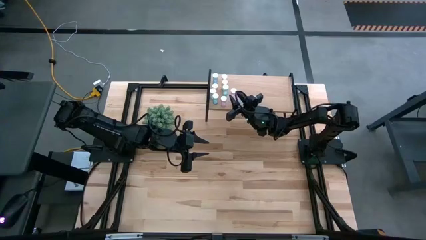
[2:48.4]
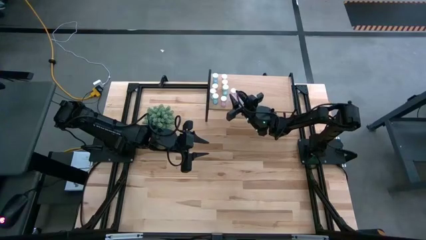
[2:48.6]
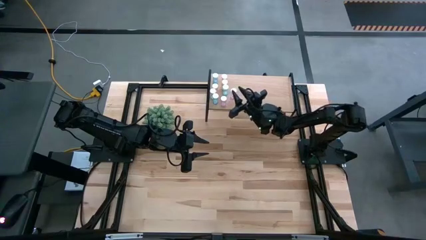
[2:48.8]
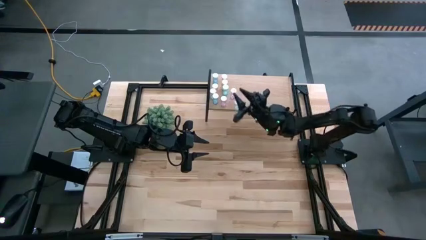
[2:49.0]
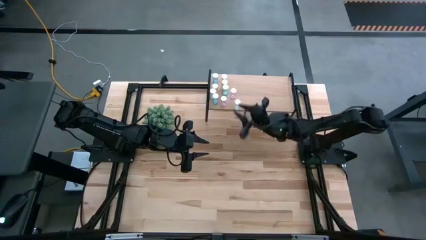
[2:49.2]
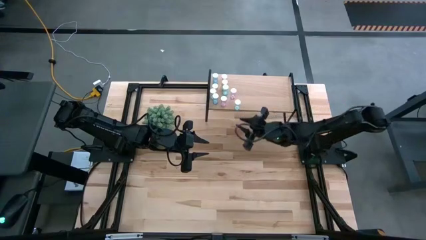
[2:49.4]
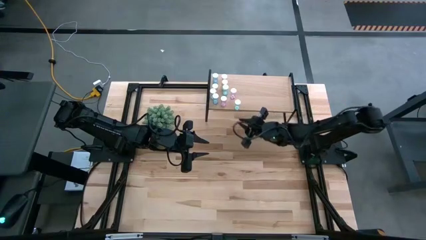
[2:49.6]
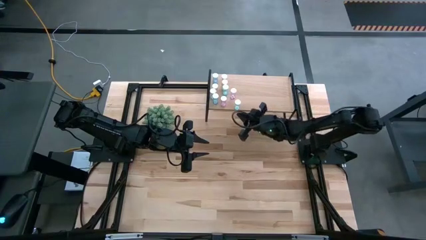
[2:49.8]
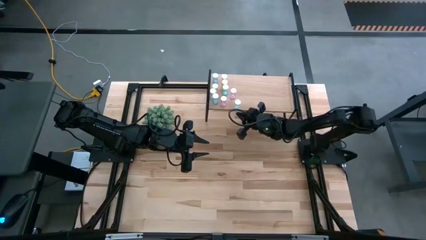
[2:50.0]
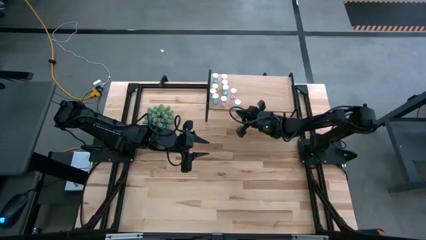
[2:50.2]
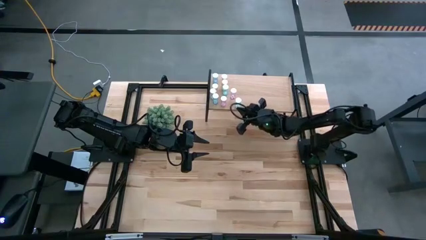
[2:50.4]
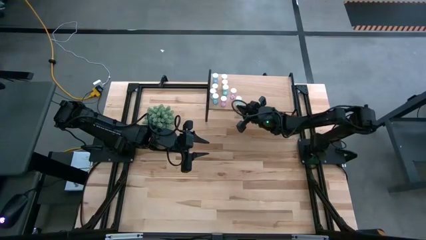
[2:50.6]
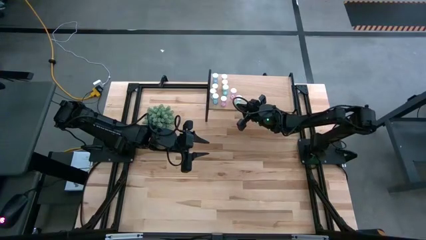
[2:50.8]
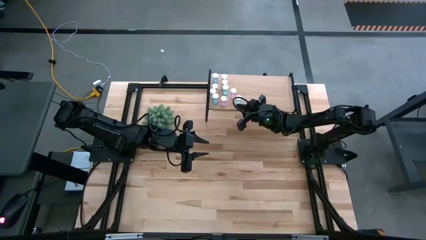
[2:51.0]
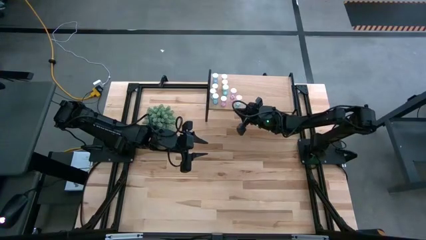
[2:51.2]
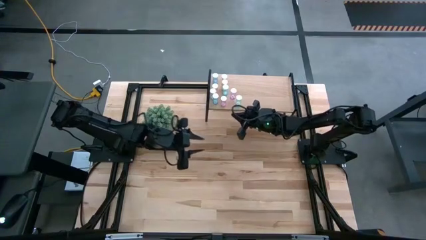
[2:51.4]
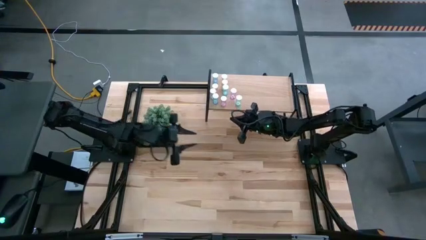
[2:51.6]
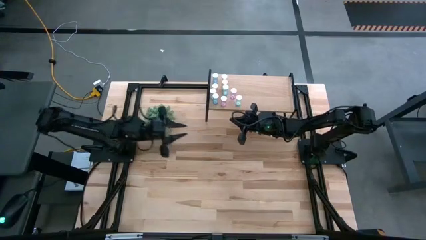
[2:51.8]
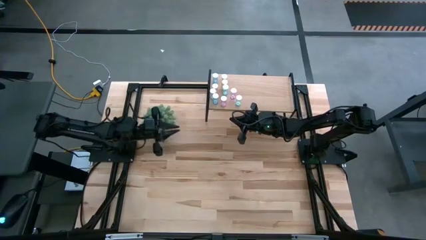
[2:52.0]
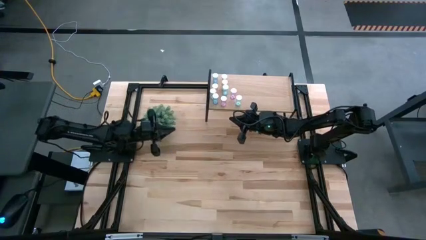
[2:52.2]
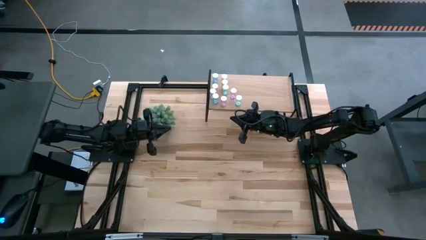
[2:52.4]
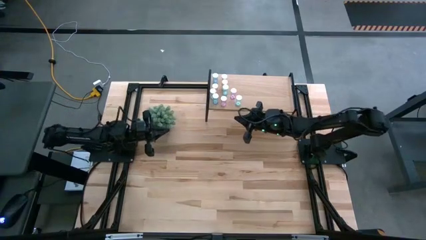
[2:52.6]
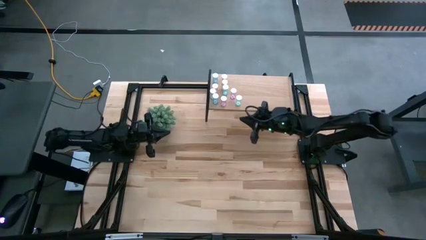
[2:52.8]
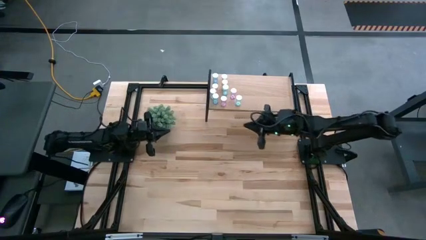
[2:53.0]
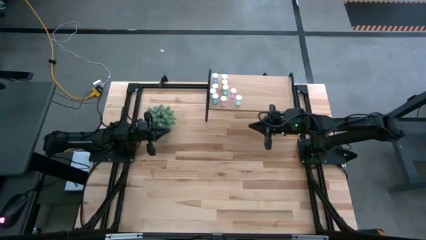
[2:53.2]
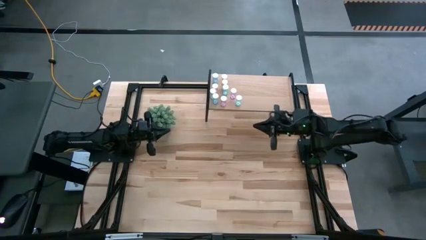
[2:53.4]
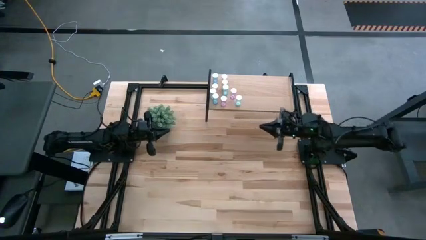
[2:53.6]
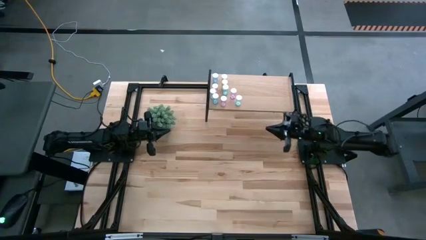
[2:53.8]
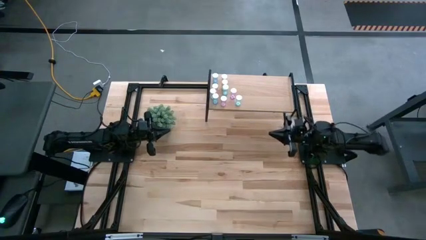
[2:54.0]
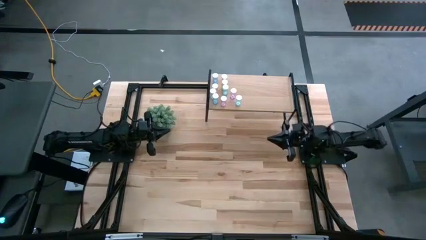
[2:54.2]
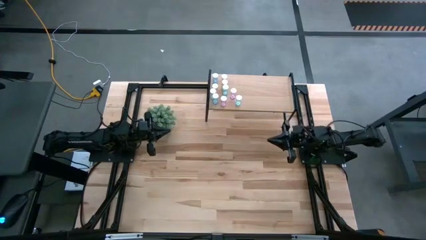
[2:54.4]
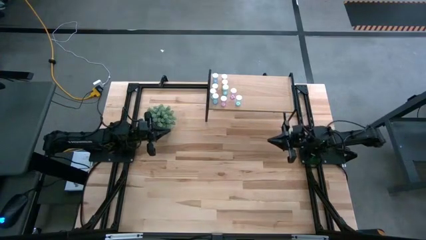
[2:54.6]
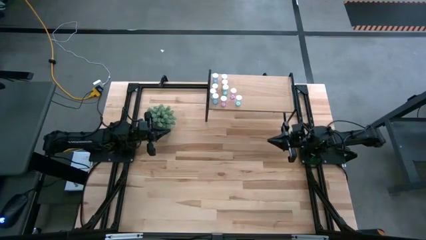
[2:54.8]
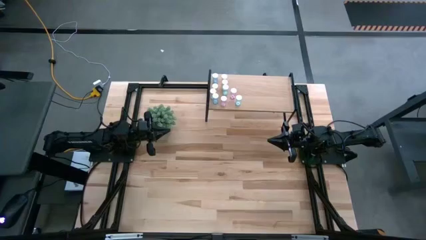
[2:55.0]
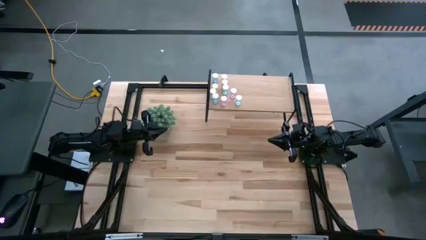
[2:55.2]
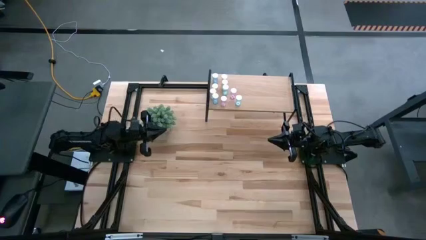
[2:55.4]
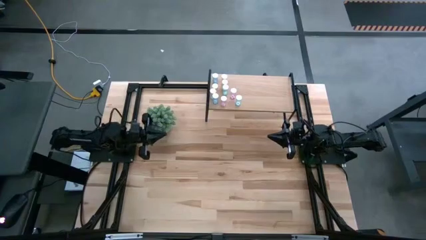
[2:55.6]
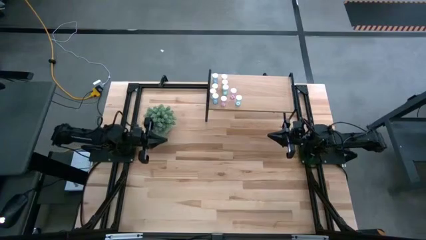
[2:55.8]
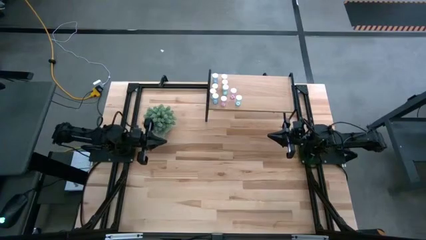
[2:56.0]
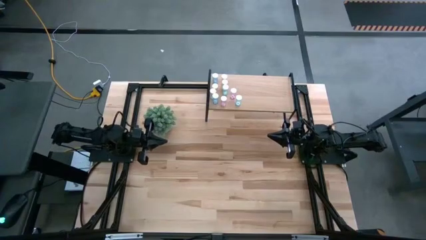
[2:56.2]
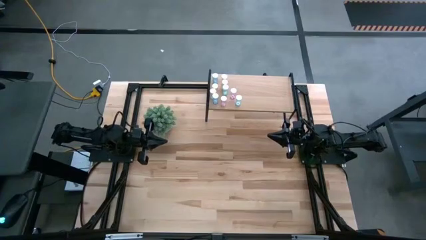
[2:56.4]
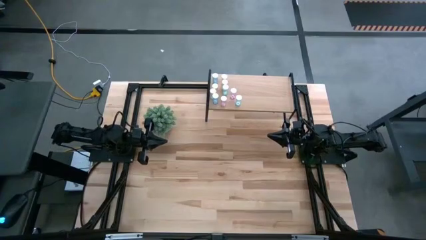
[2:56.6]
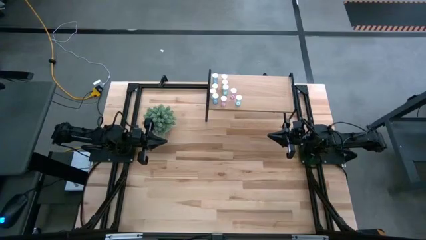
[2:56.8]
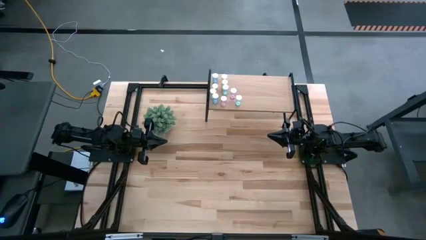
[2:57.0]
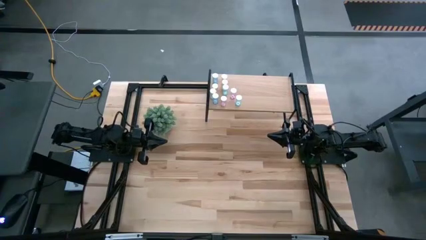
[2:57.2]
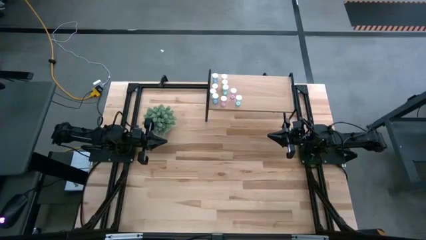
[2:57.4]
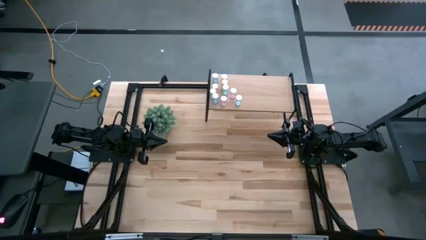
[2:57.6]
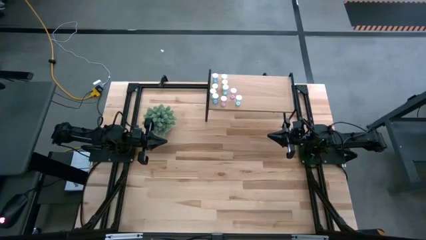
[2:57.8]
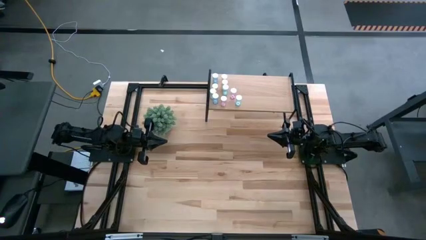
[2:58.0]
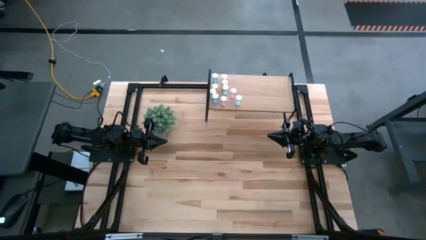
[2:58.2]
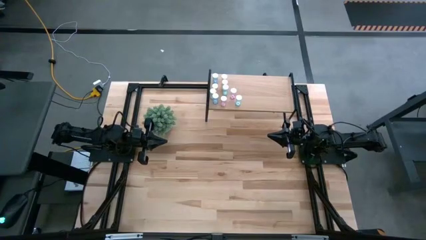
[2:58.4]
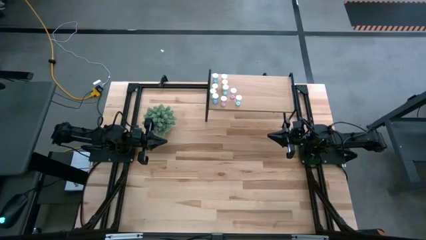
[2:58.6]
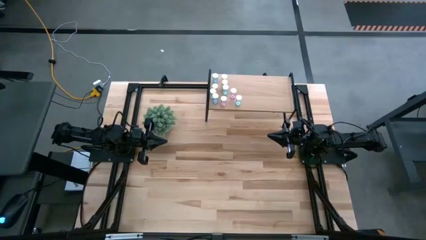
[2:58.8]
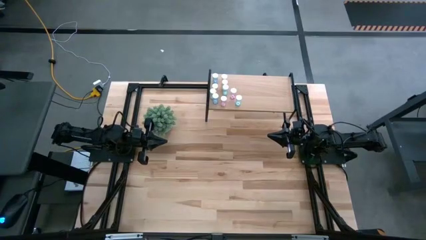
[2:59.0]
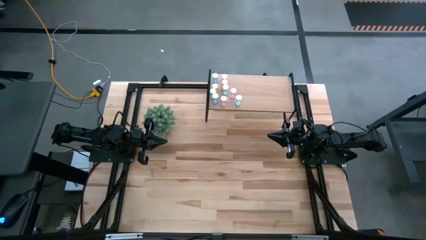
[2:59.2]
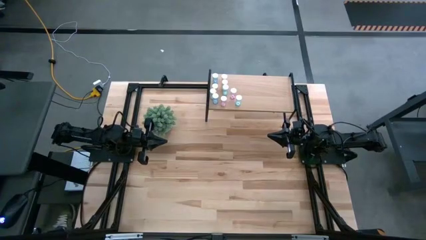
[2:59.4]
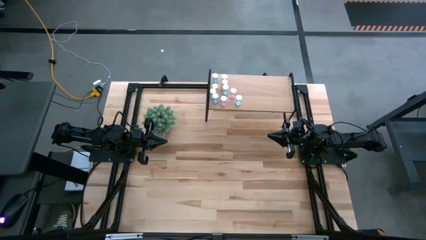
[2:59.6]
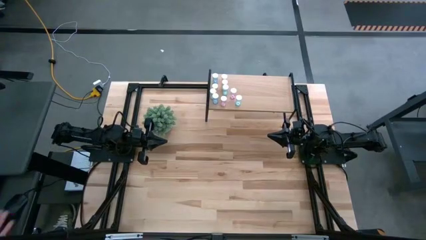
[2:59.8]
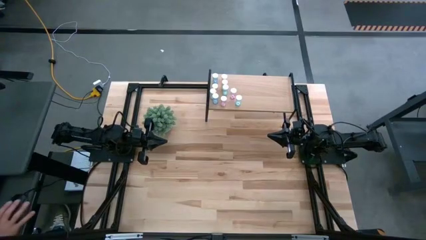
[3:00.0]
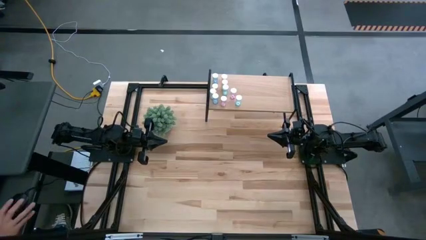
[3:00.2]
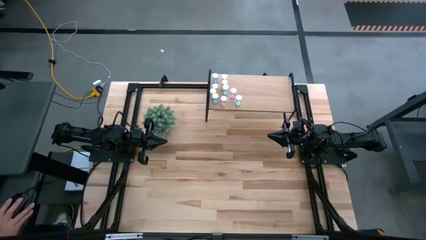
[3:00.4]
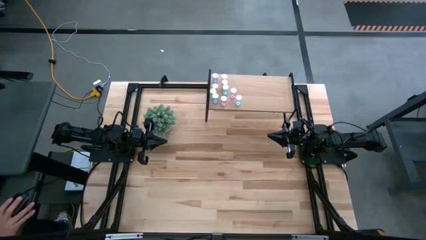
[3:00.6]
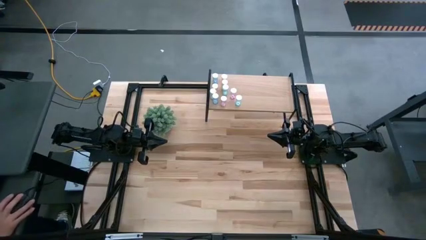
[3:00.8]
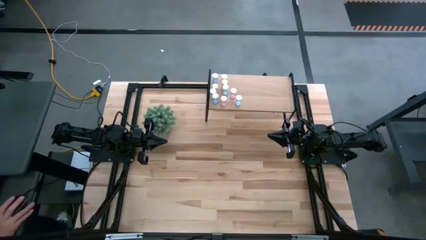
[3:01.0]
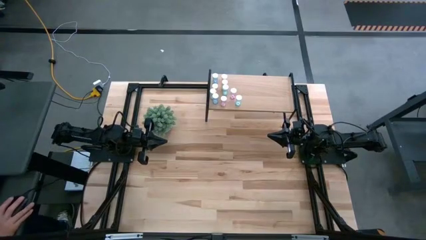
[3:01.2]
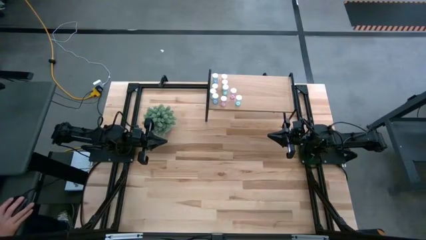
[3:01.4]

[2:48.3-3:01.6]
Task: Pick and place medicine bottles onto shelf by color
Return to Home Position
